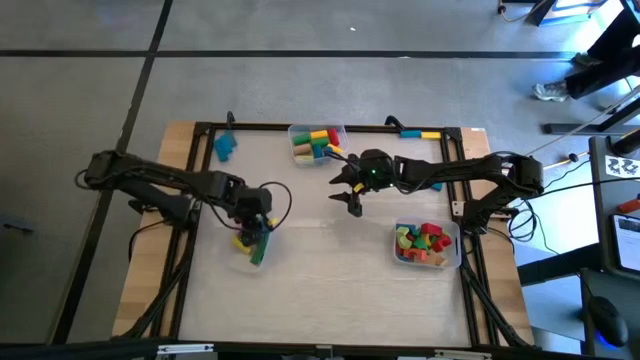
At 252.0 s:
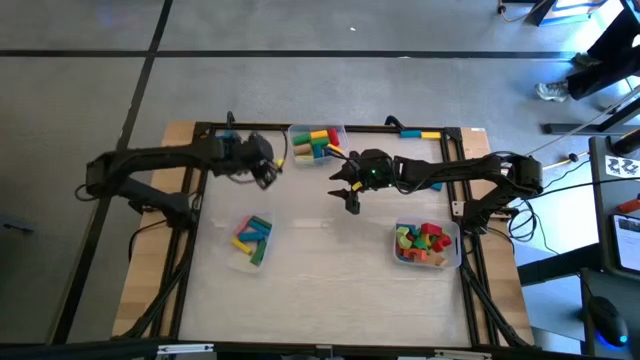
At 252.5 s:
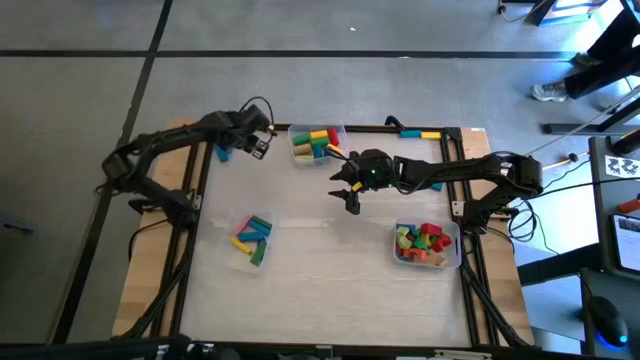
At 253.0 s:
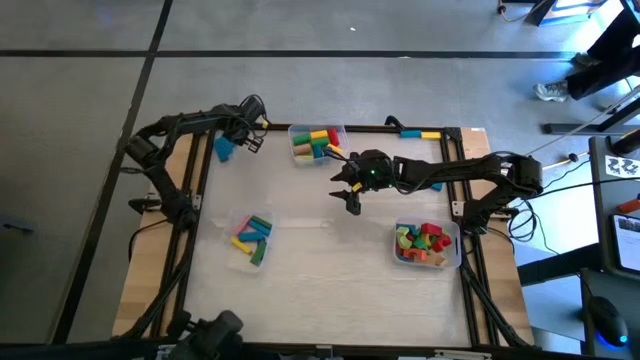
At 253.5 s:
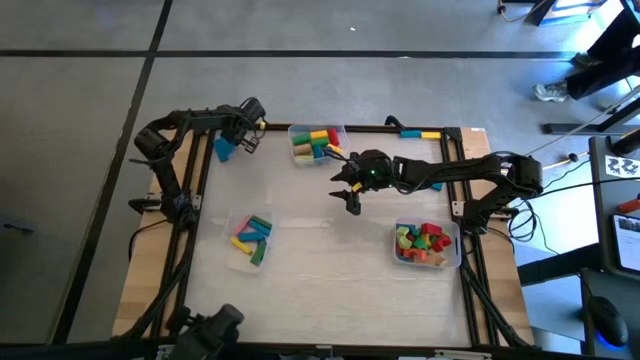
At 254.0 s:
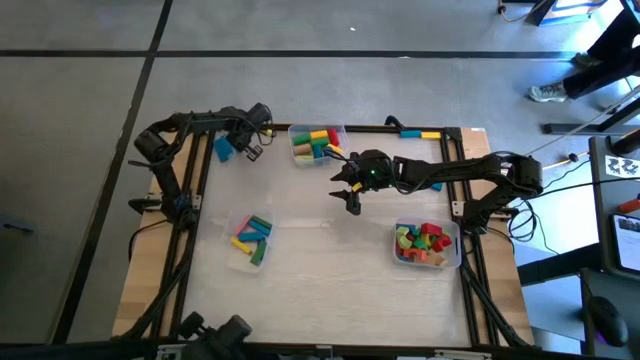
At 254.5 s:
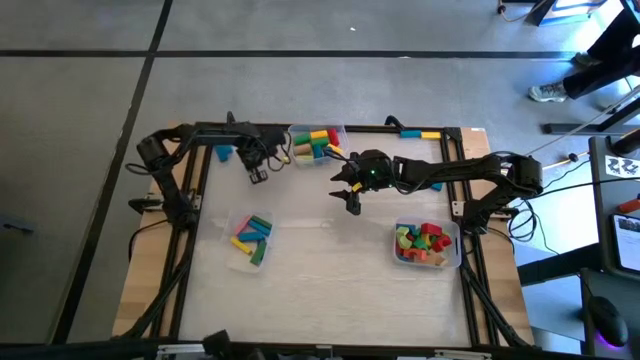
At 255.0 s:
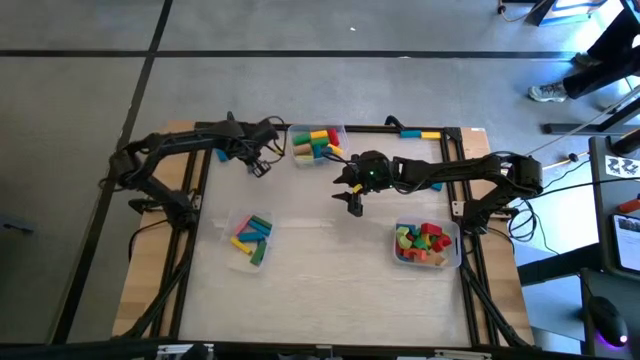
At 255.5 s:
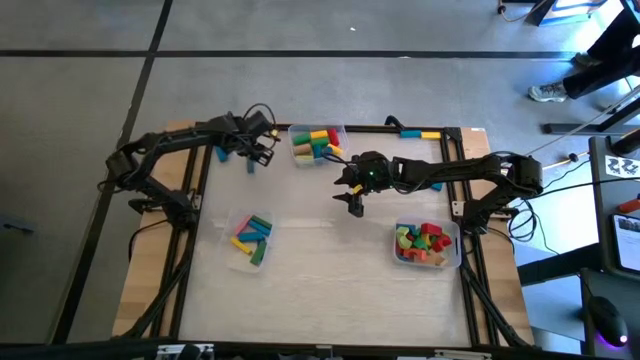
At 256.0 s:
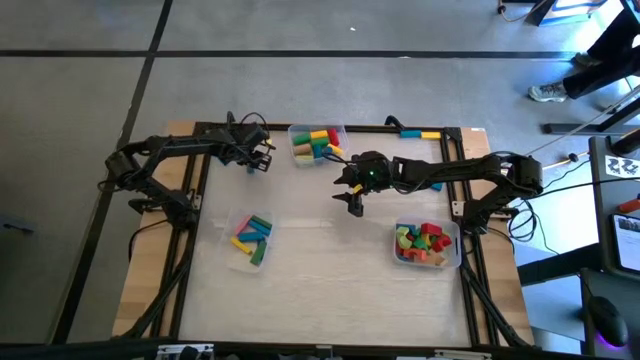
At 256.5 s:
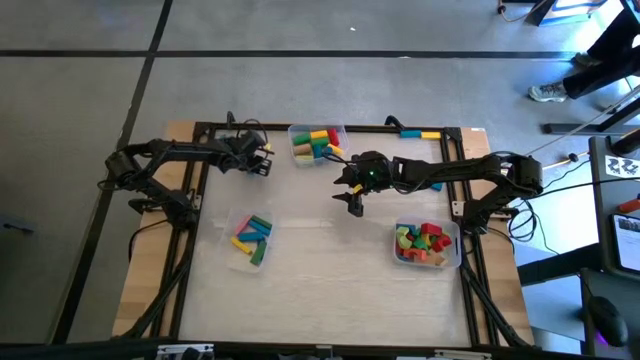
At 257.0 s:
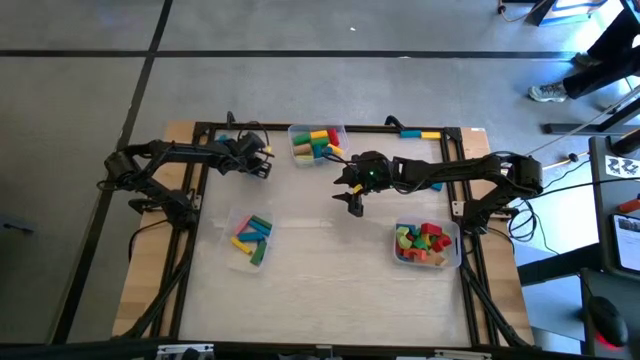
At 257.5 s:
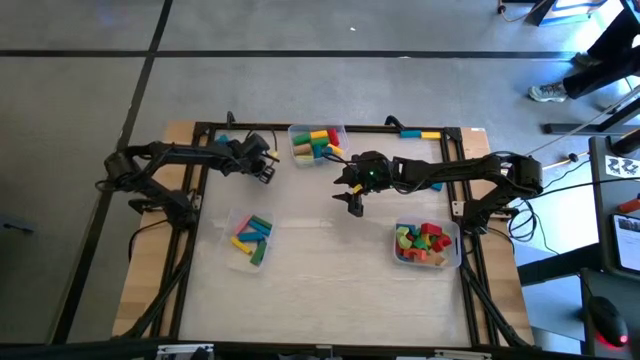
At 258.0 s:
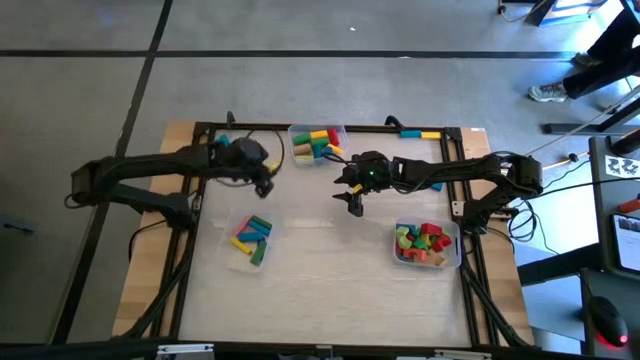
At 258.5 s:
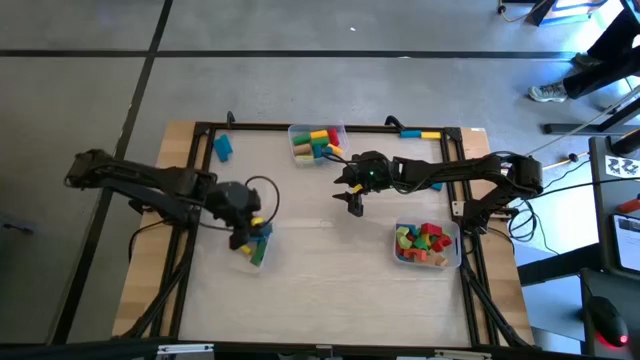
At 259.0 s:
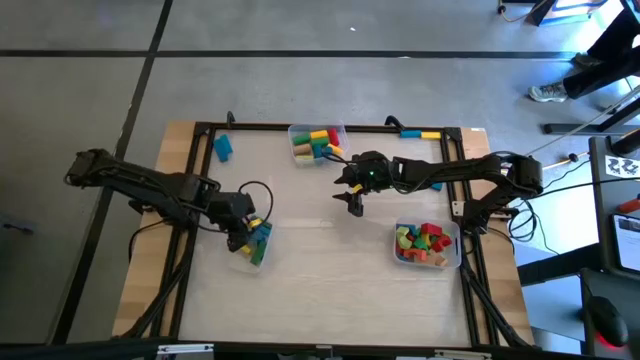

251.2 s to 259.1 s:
Task: Sort blocks by size
Put the blue rectangular block into the bottom left transparent bin

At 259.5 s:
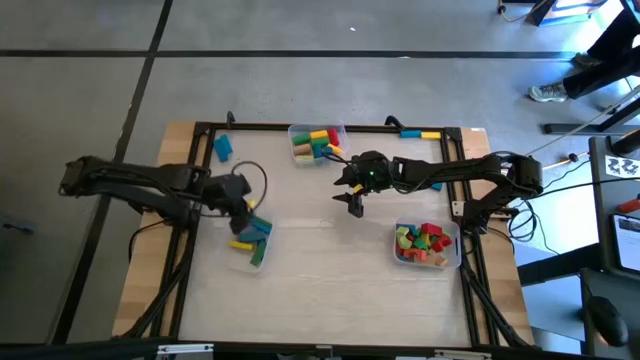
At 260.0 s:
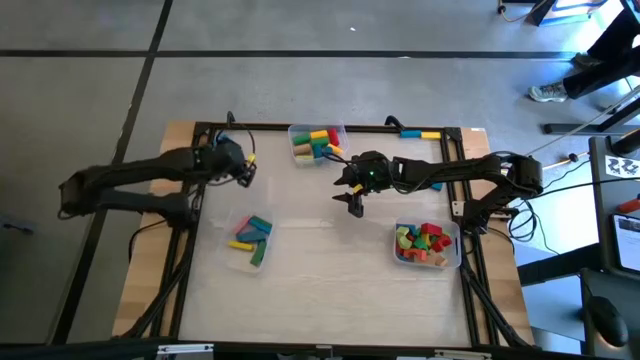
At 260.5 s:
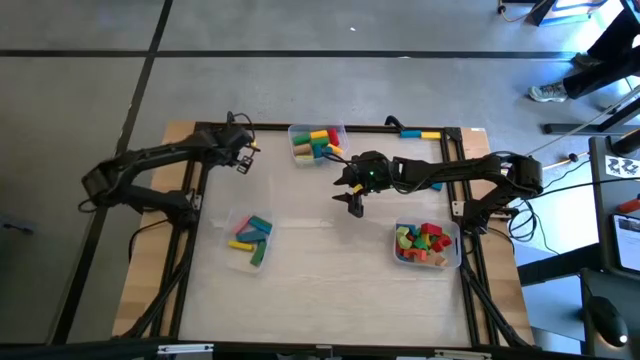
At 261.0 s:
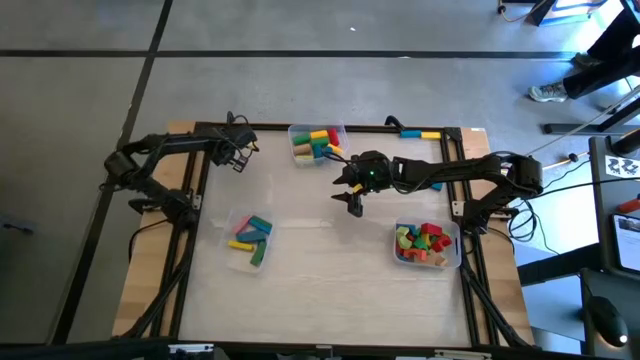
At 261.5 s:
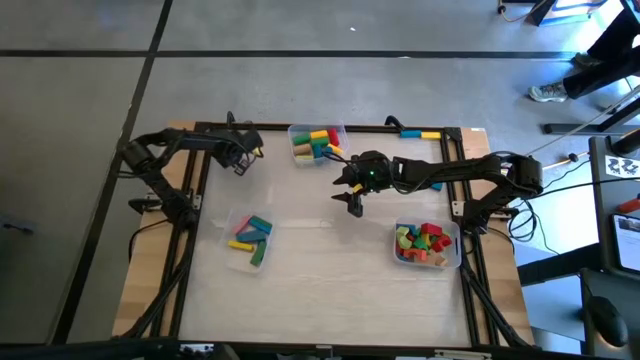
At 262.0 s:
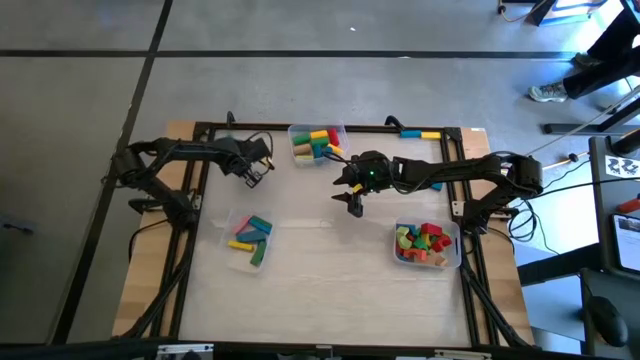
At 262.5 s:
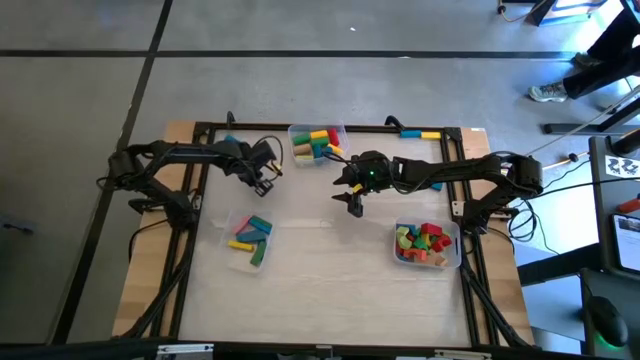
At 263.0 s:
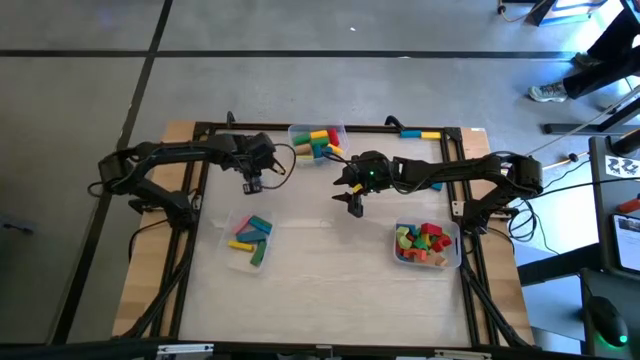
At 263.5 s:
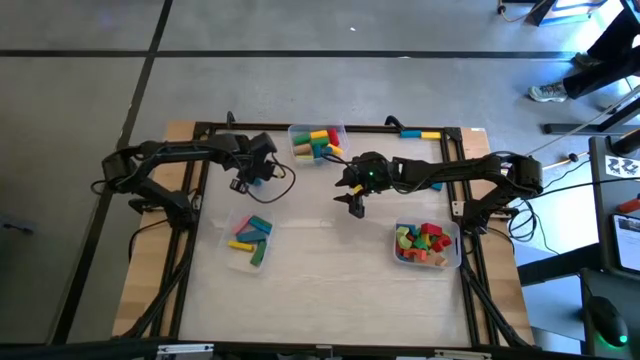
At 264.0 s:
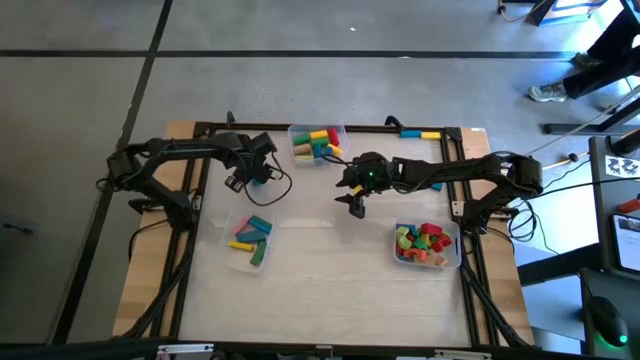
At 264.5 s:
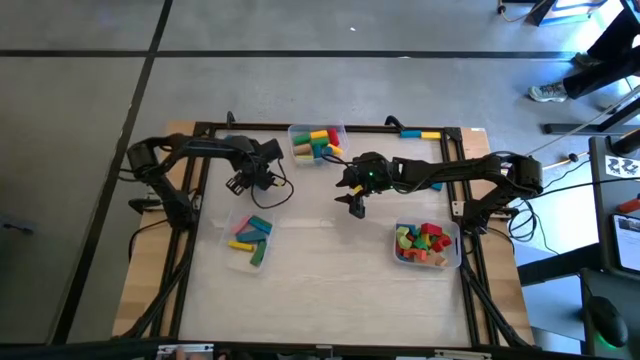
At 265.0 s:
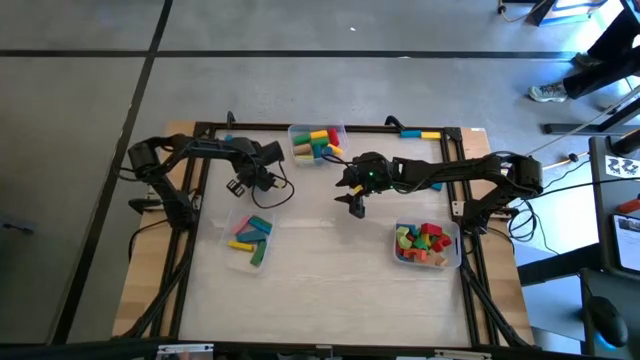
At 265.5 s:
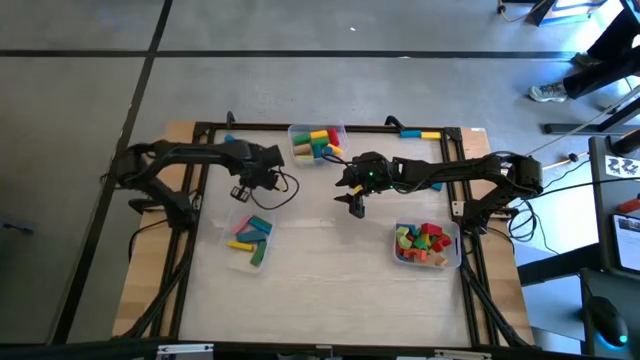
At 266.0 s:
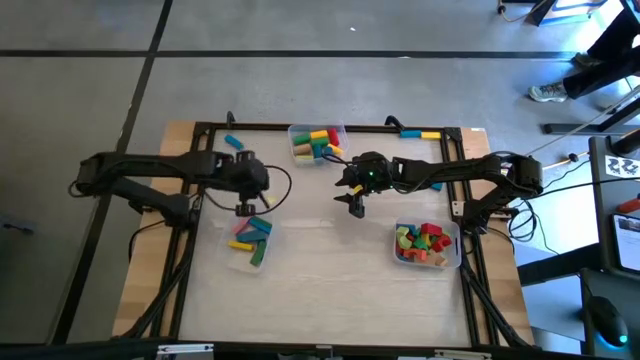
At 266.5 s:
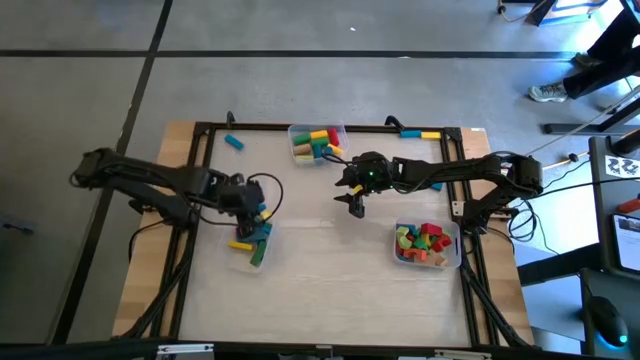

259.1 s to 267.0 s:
Put the blue rectangular block into the bottom left transparent bin

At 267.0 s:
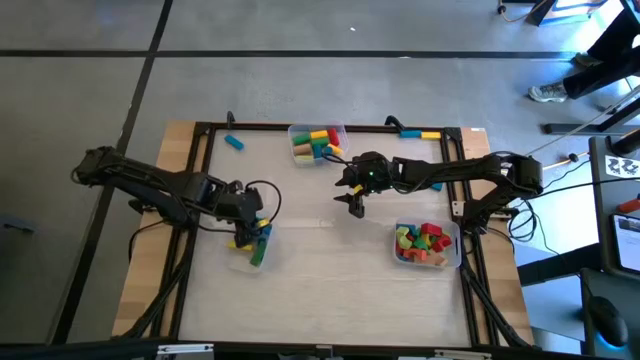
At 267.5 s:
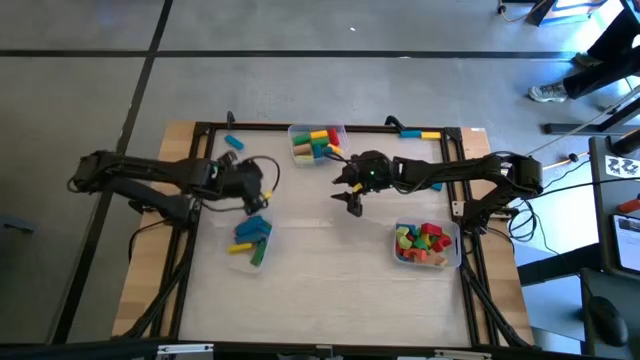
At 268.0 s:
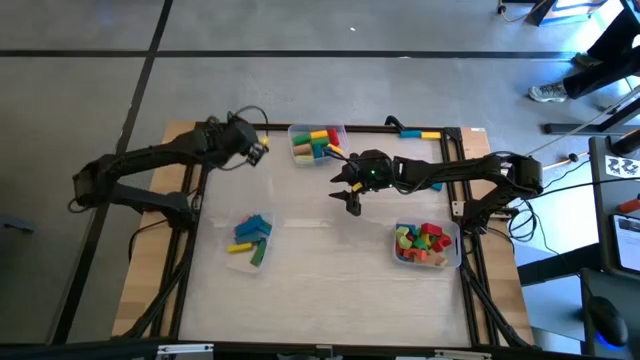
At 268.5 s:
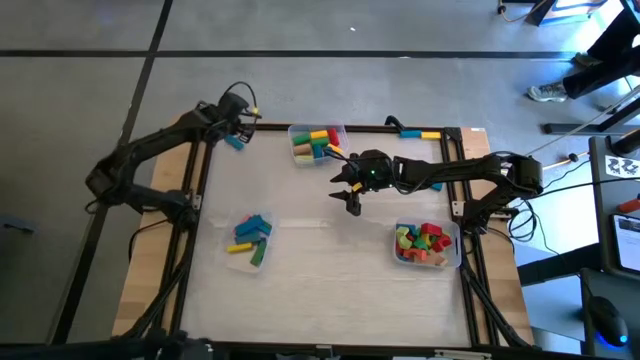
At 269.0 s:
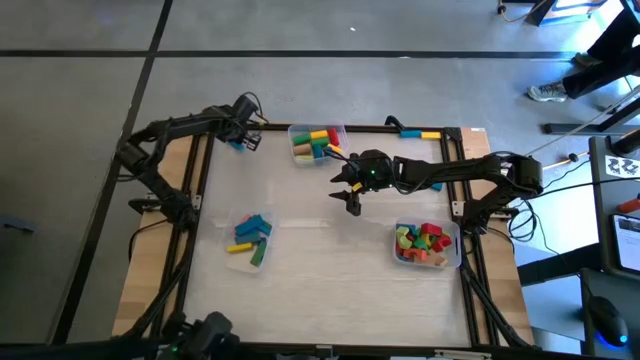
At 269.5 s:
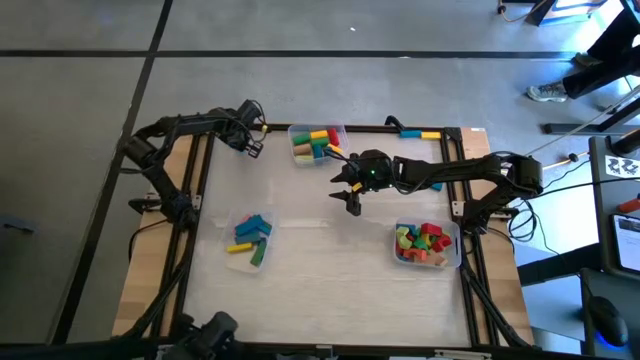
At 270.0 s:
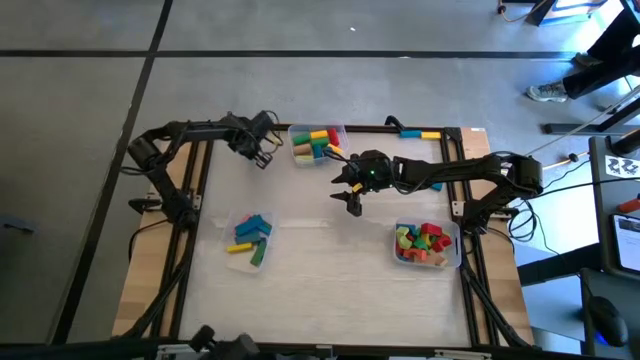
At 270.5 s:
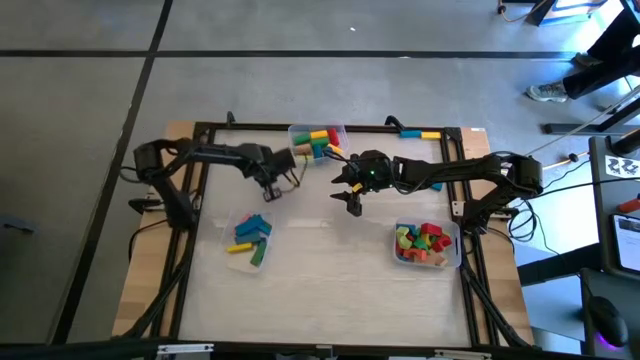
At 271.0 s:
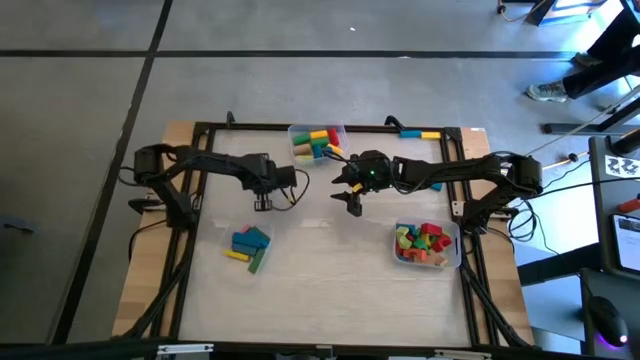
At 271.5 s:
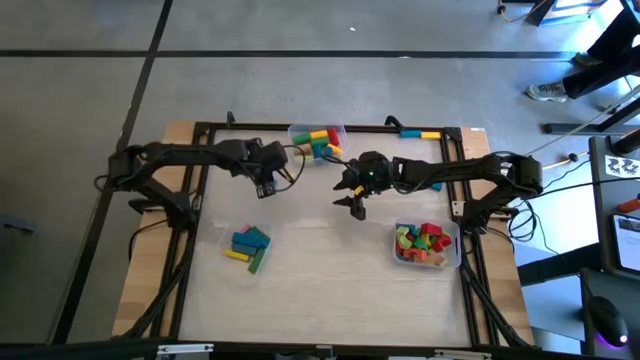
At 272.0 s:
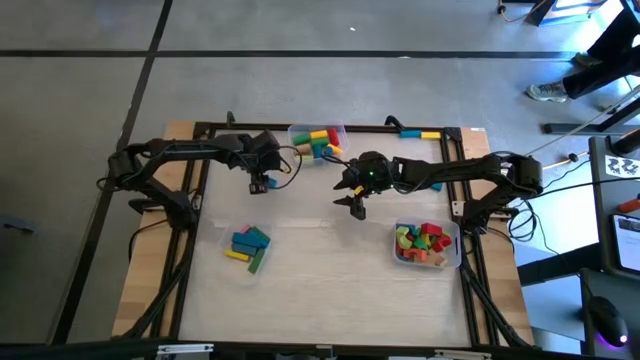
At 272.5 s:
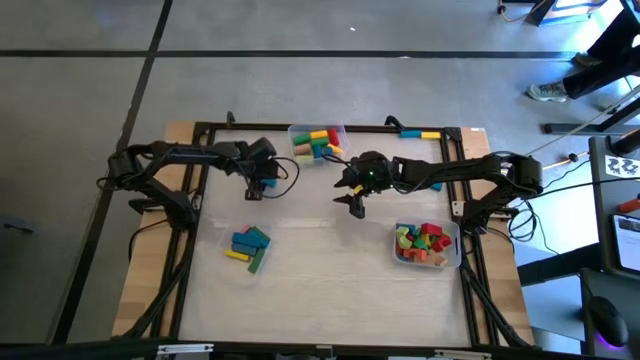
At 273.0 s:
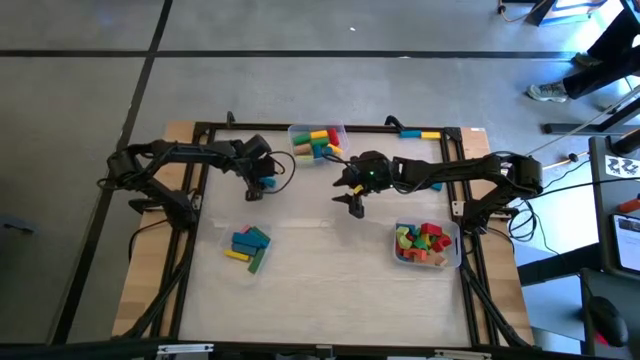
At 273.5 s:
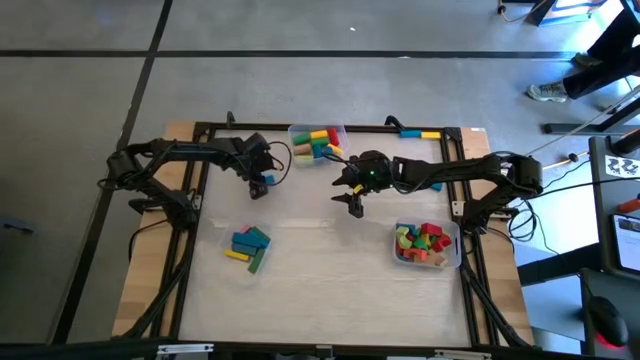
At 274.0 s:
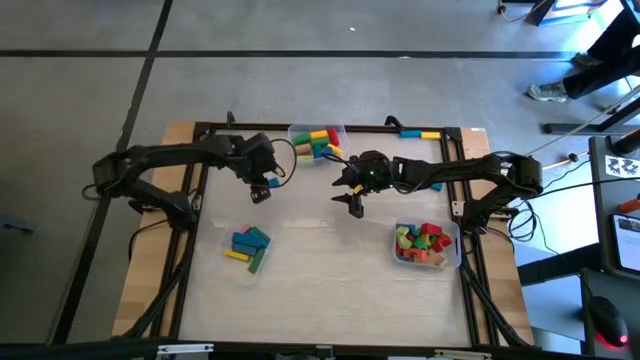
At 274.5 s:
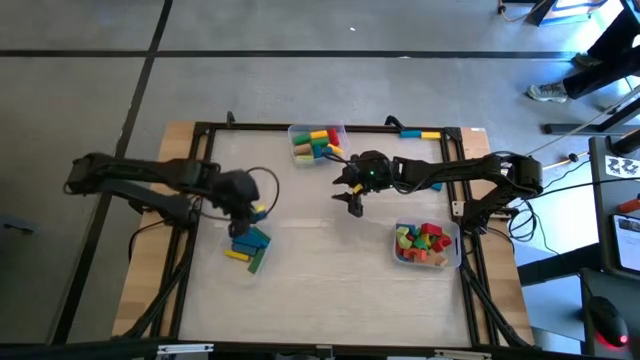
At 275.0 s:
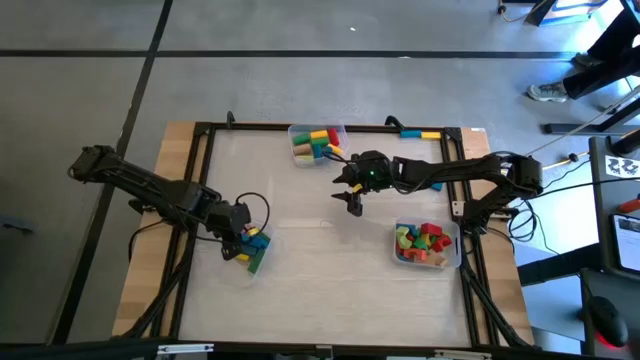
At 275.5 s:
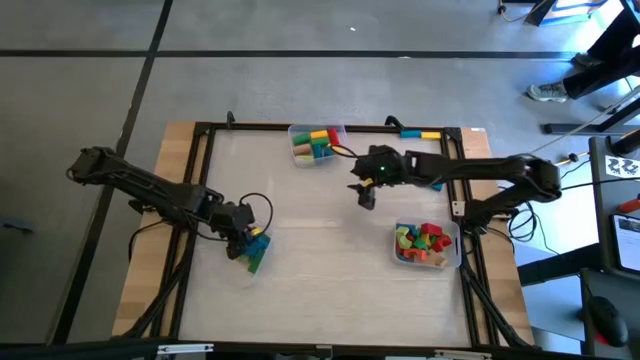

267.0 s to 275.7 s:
Put the blue rectangular block into the bottom left transparent bin
